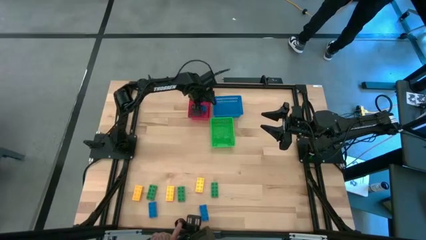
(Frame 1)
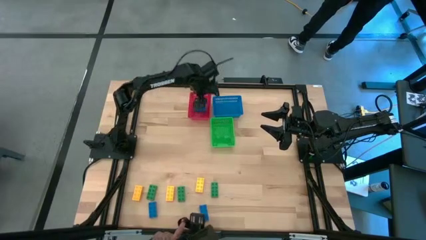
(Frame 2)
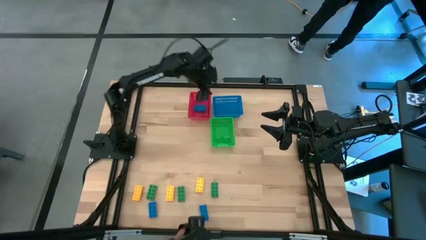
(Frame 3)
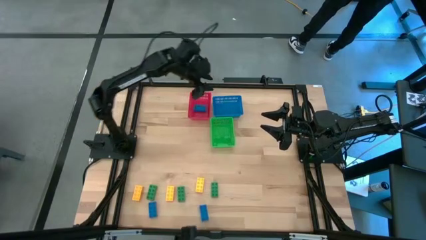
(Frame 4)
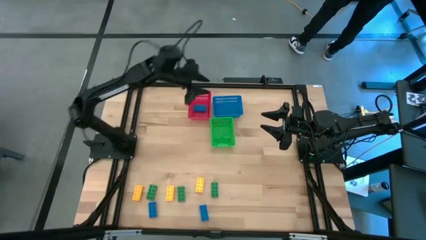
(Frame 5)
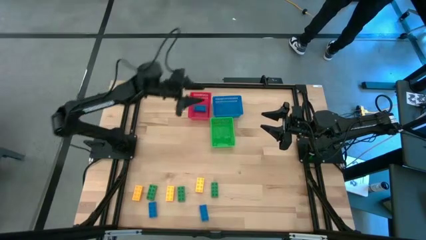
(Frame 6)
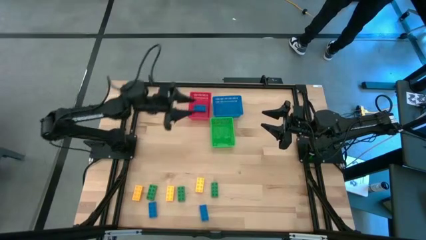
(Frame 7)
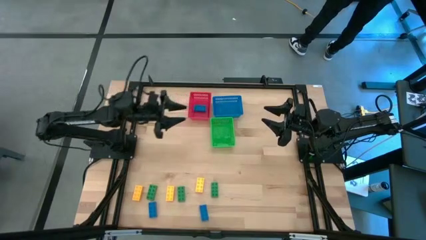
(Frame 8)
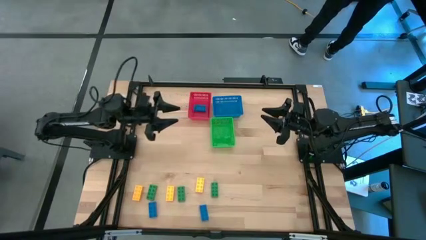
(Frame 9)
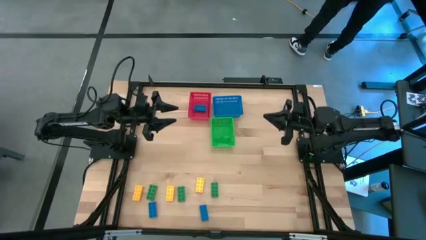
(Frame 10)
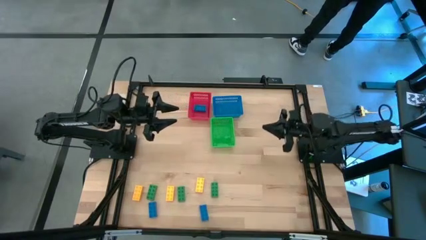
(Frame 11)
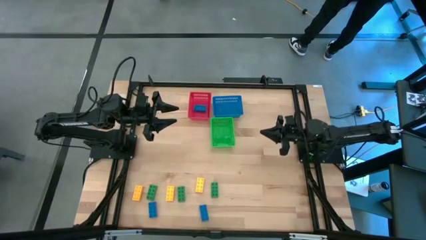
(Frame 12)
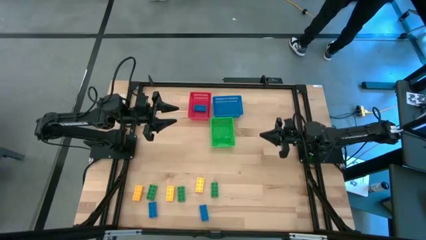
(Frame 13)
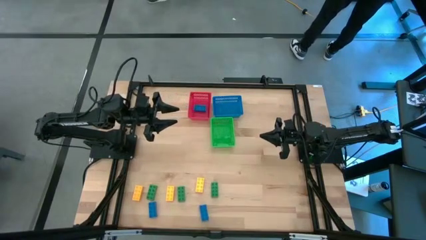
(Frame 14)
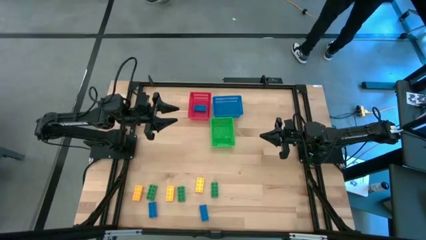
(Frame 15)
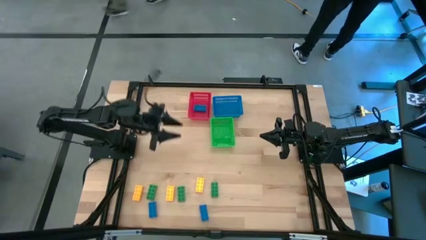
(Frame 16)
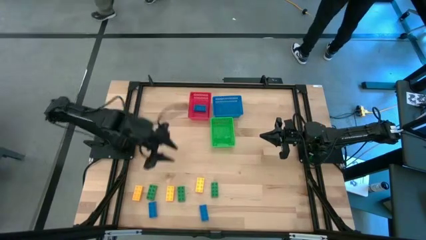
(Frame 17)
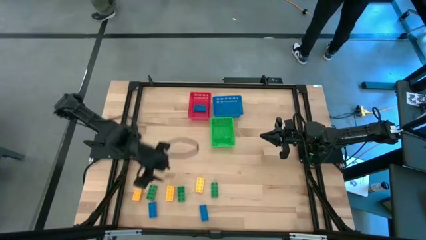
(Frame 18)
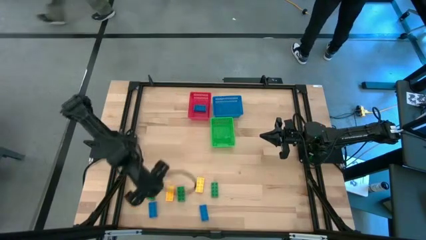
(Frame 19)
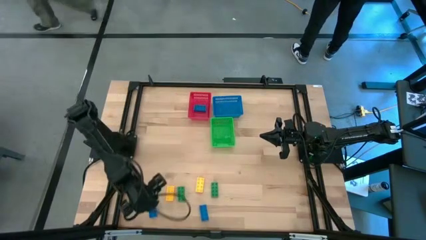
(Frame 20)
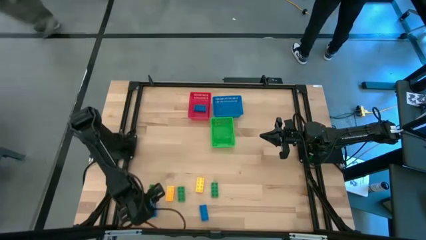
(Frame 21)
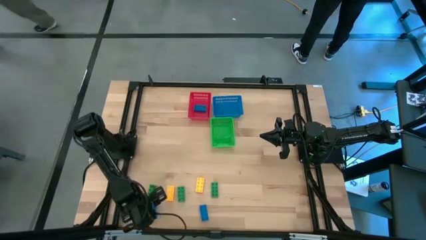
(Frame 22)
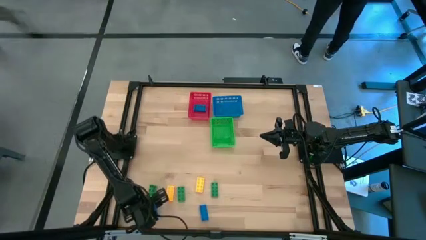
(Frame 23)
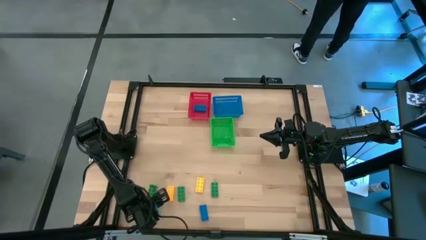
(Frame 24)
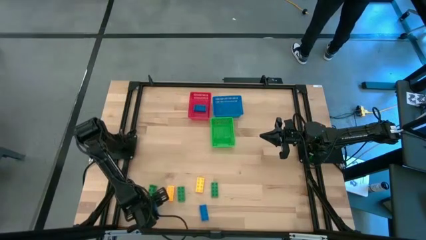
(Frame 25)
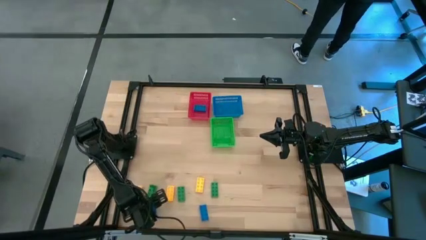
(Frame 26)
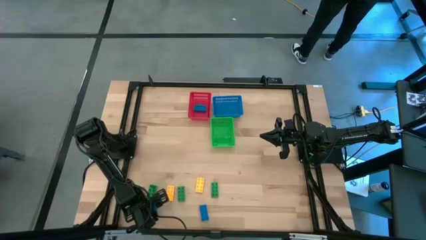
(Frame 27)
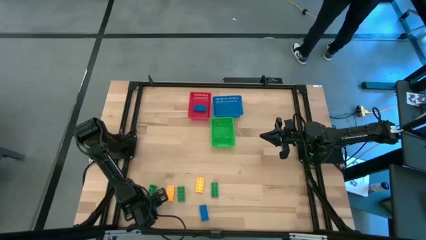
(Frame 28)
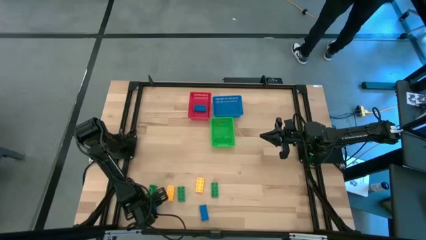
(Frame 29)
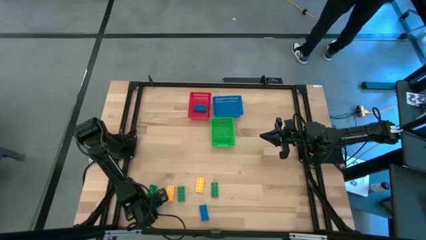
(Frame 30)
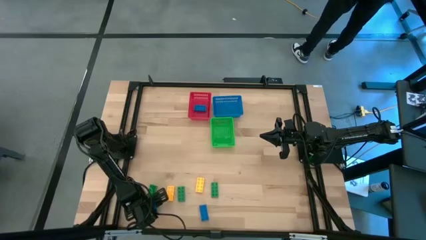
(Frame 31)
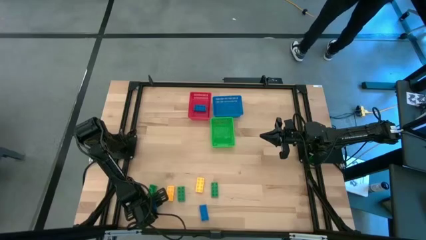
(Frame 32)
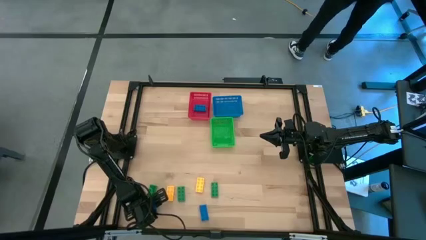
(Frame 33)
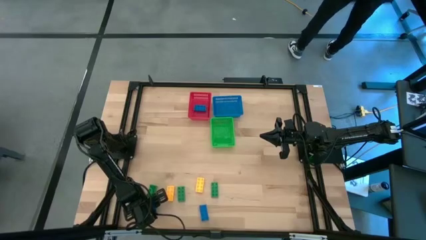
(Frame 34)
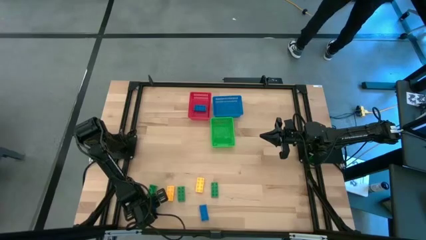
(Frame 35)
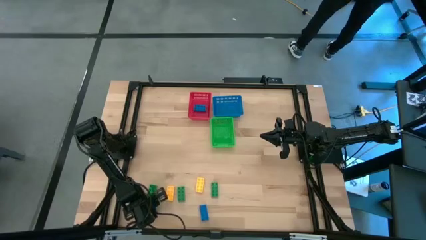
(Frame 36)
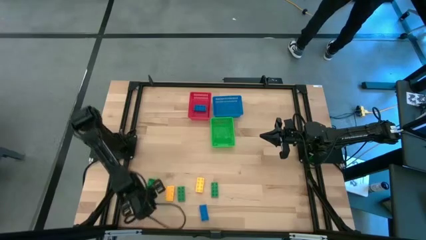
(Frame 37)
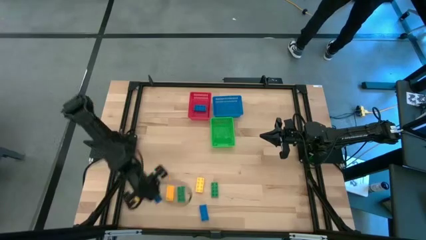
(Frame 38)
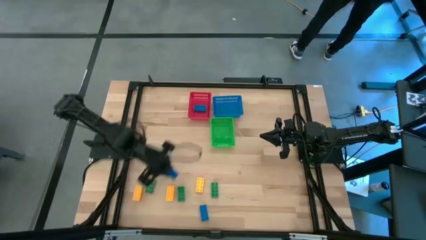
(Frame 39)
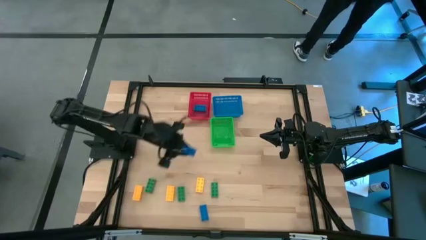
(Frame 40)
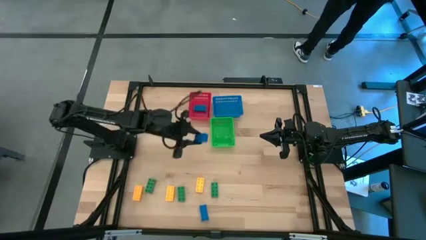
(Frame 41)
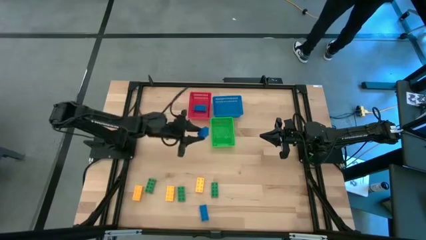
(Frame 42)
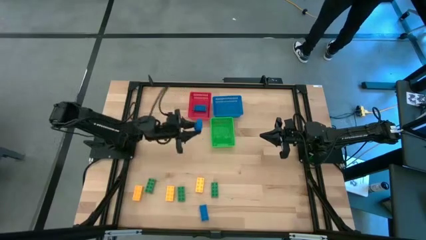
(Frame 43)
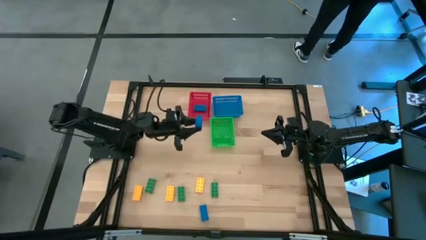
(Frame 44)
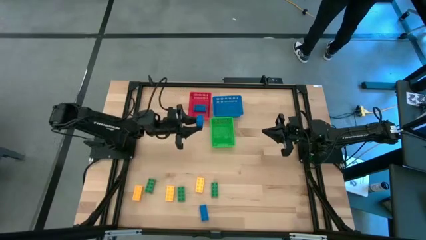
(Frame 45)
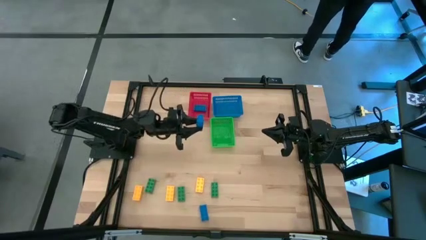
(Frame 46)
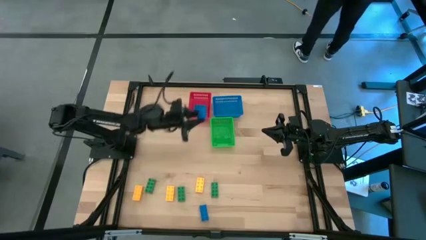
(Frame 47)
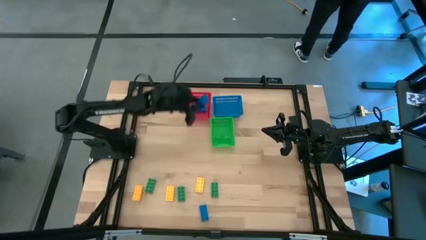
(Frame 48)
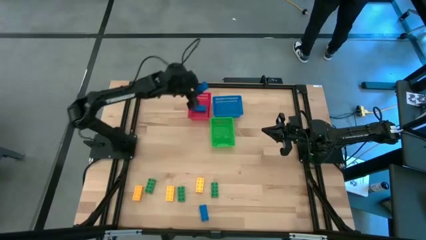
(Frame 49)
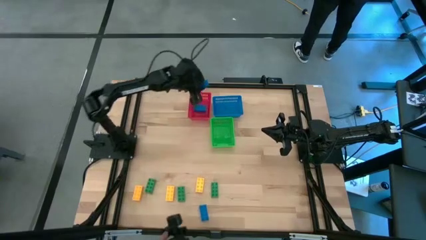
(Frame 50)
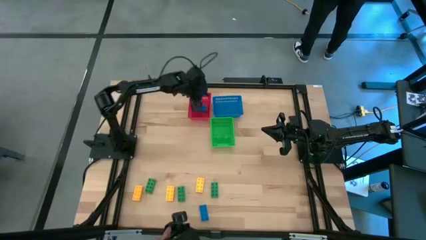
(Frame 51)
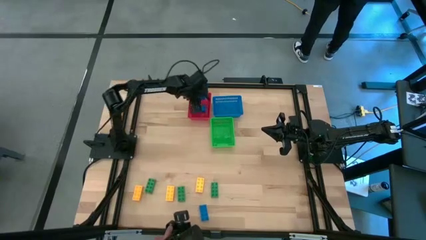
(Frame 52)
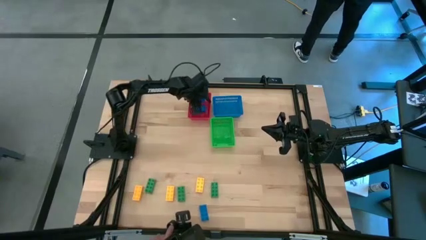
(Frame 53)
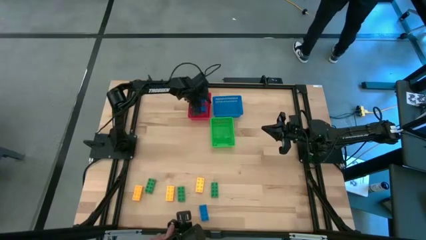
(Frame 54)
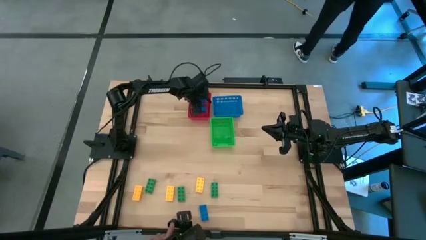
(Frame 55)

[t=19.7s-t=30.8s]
Task: Sort & place blocks by color
Put the left blue game piece into the red bin
